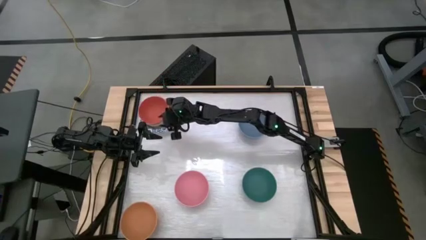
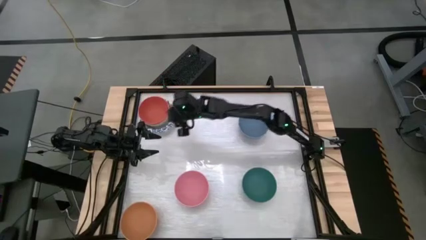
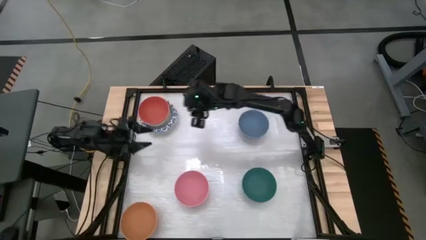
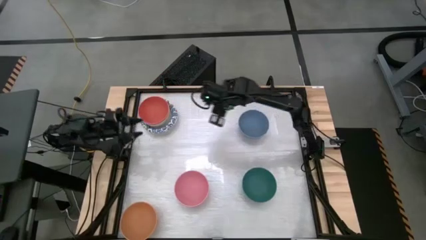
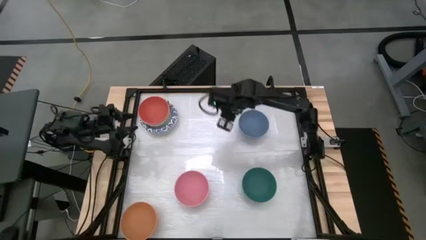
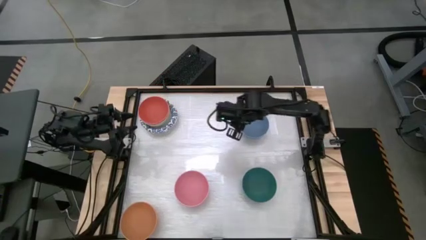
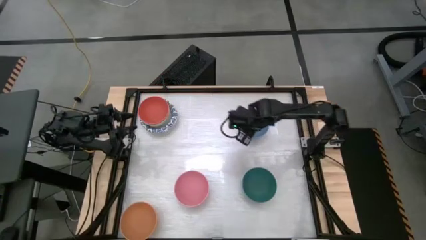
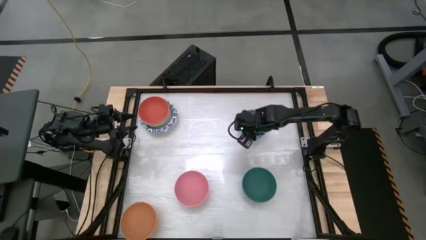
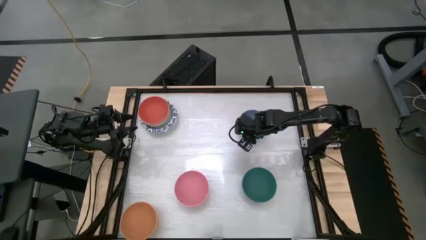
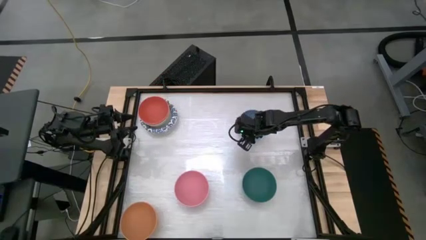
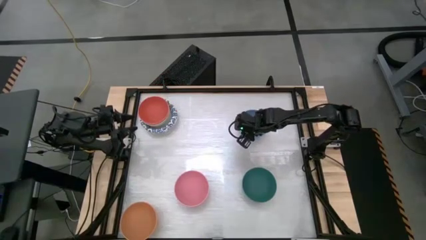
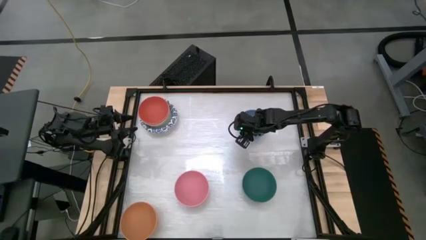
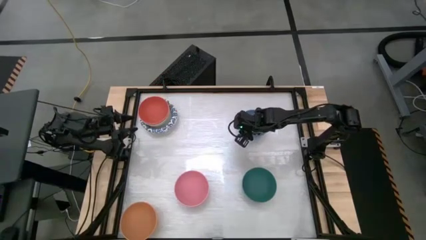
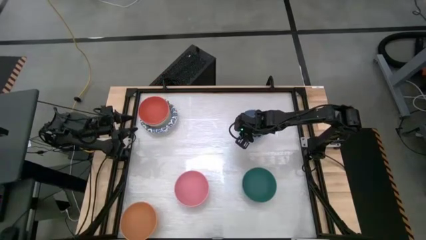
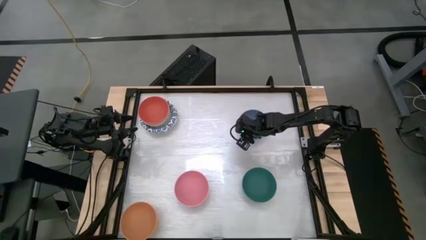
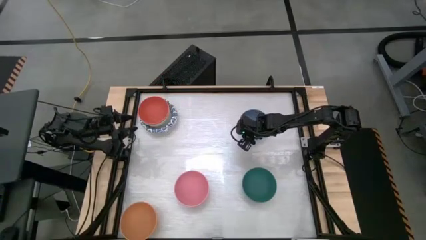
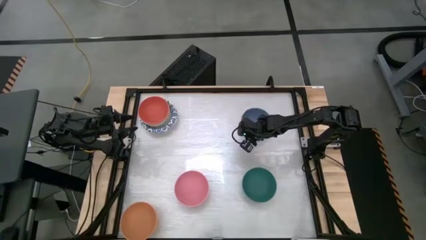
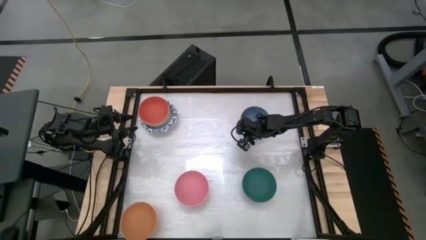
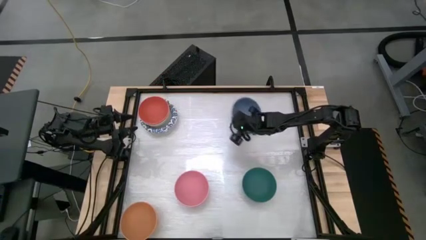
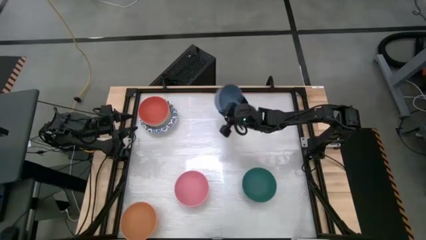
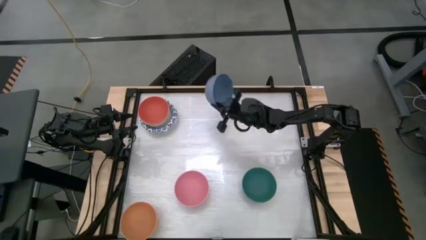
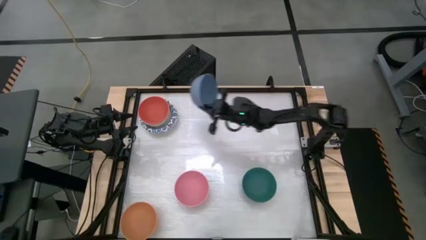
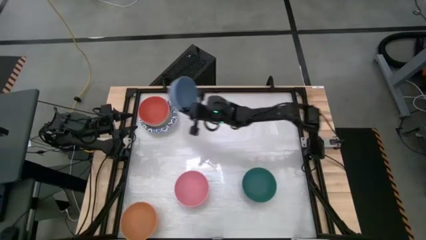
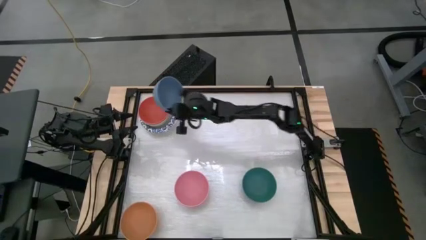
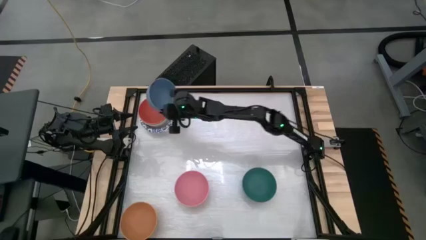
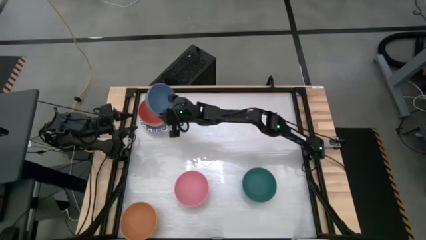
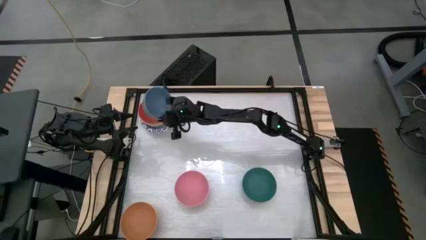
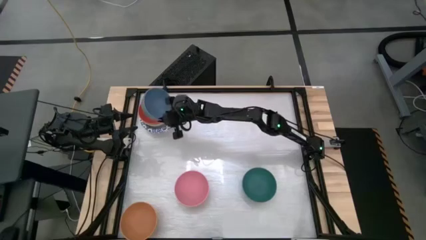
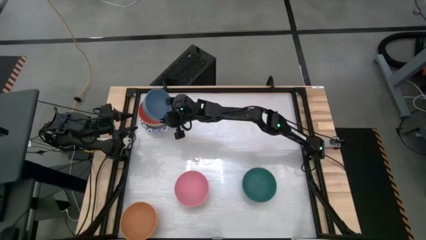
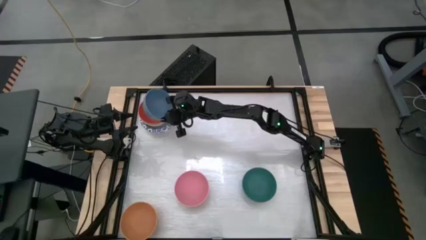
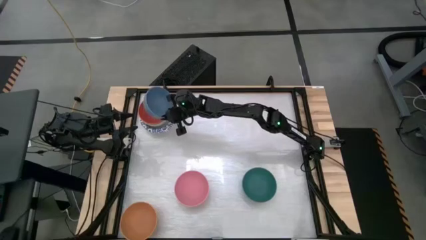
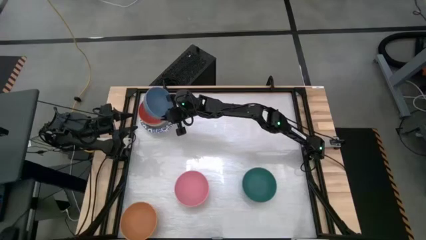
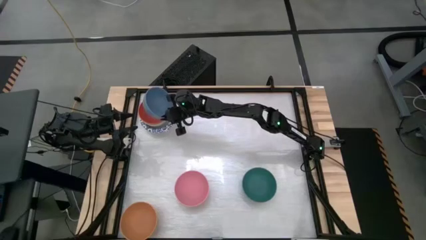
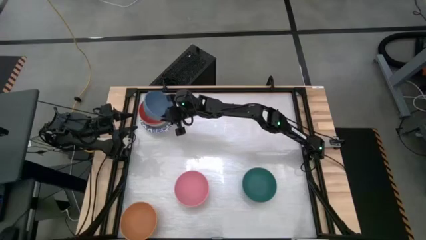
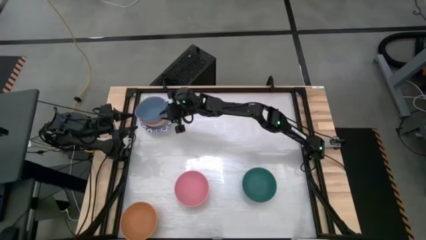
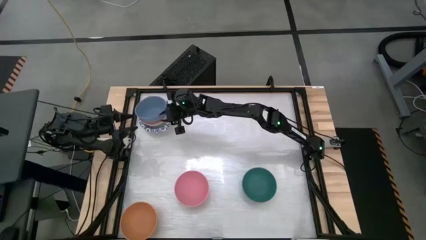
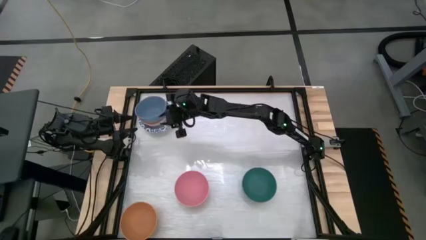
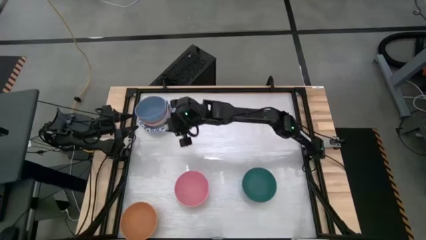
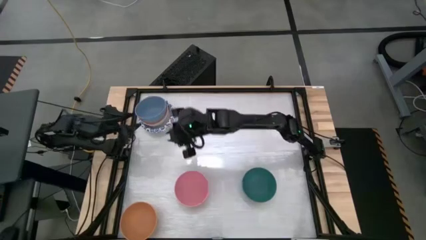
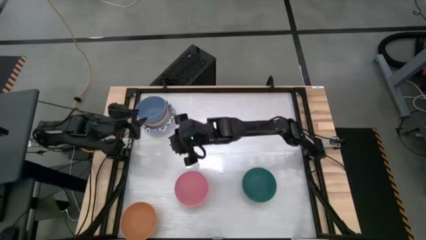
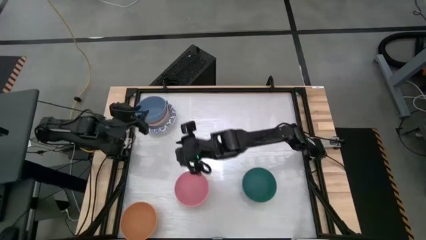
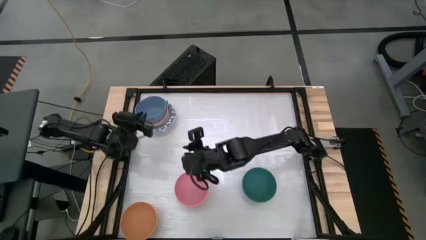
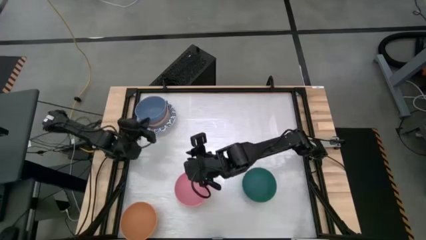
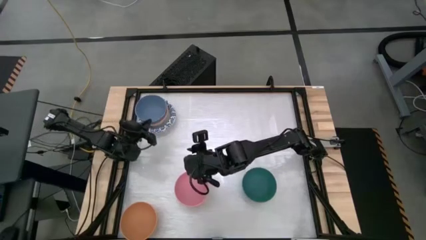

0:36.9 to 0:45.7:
Stack the blue bowl on top of the red bowl

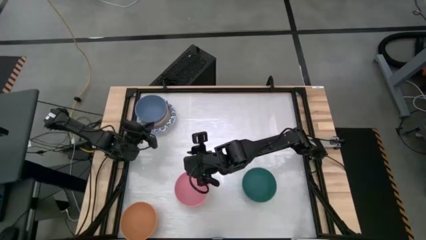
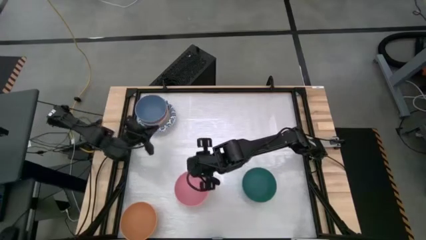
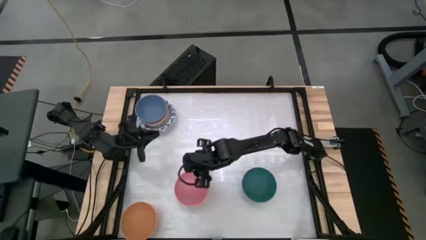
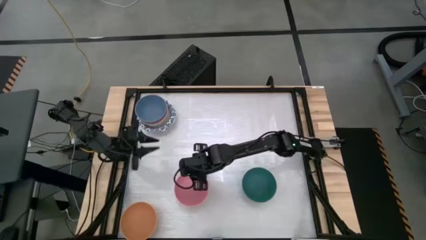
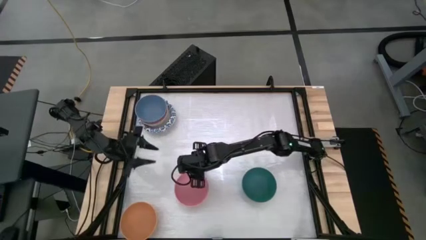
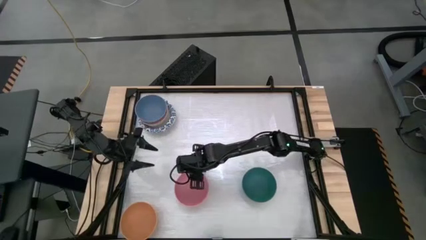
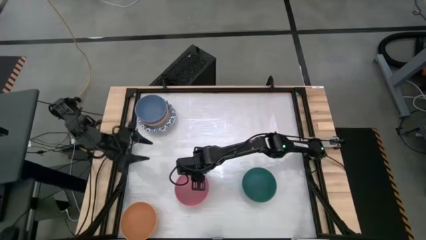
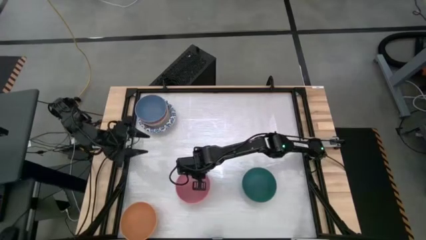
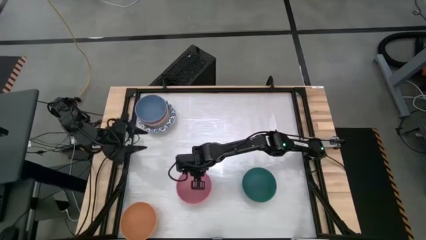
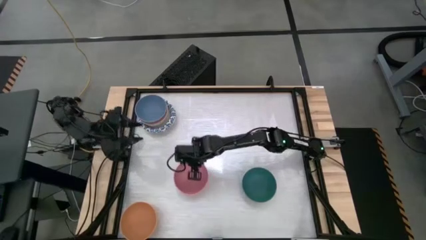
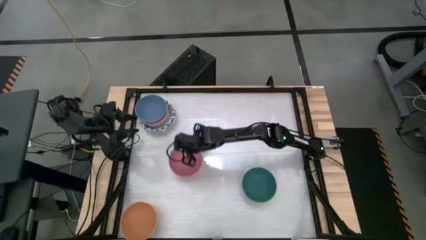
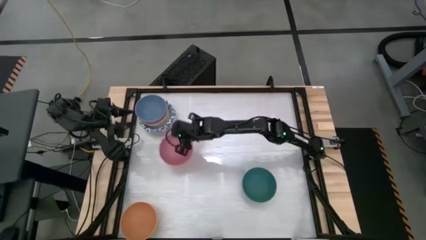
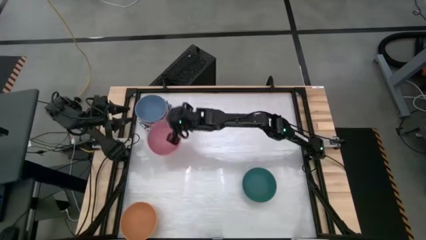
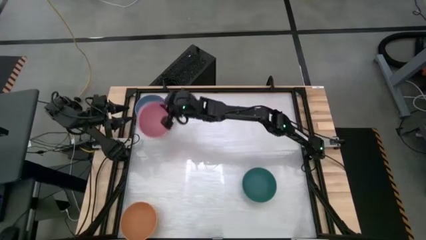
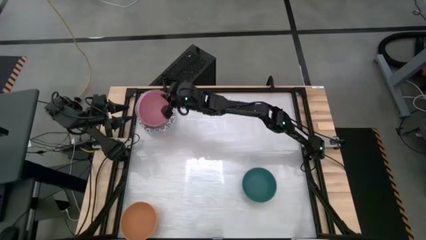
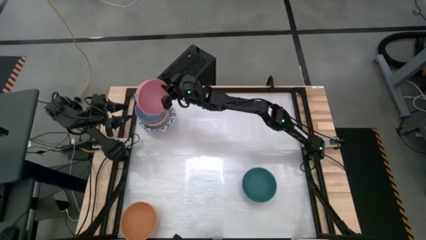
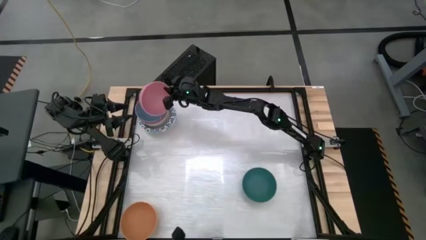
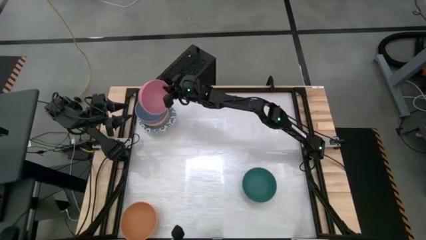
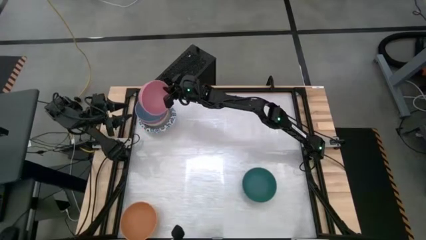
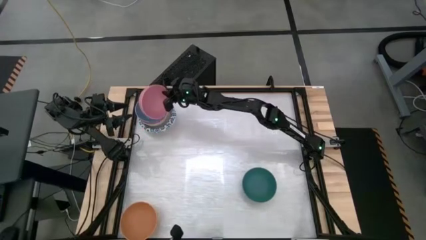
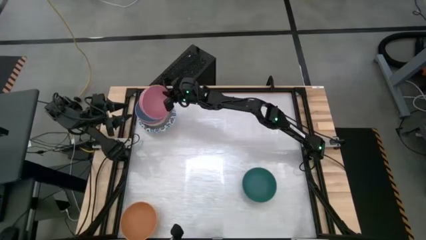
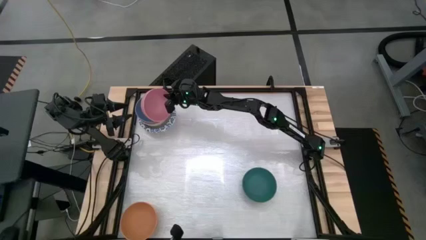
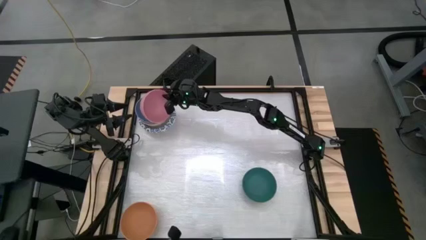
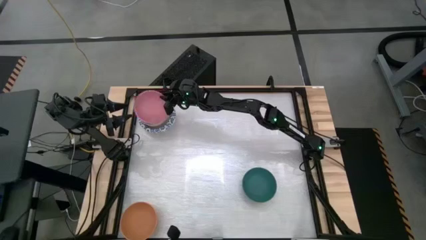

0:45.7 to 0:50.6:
Stack the pink bowl on top of the blue bowl
